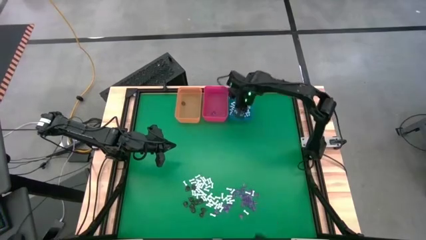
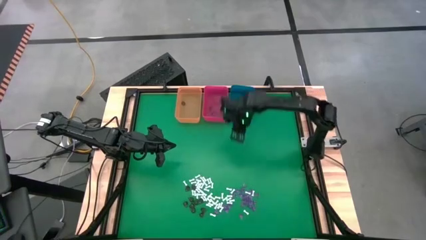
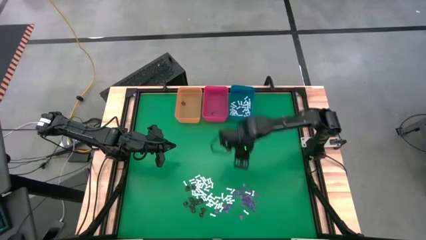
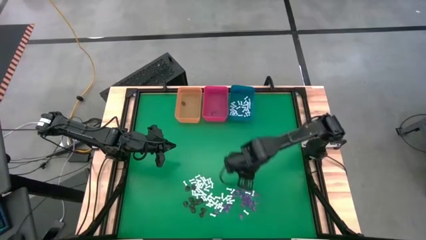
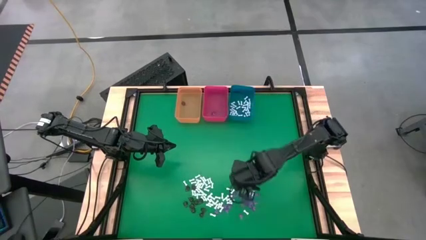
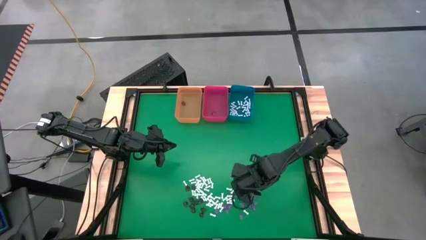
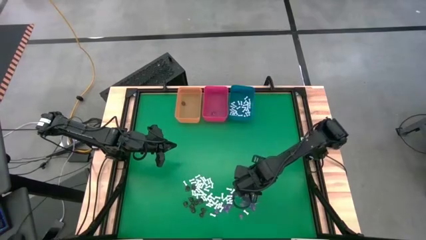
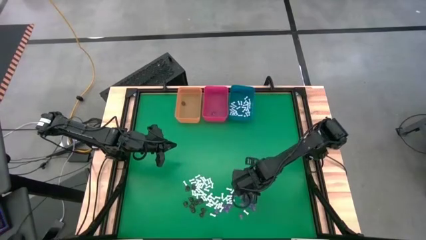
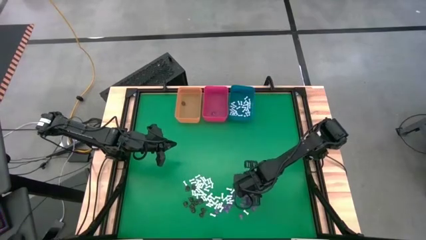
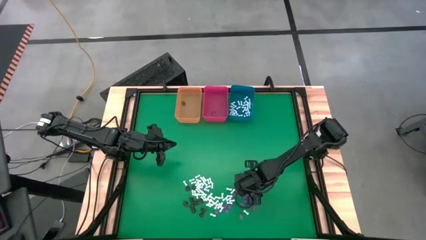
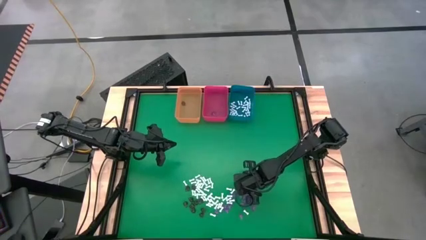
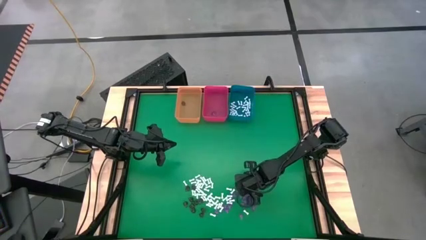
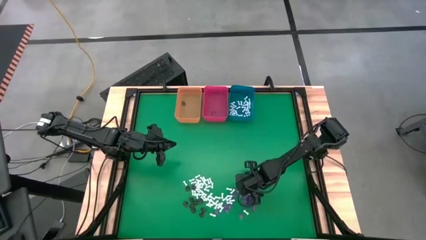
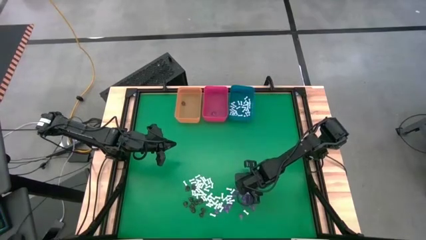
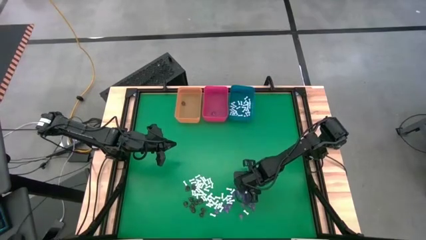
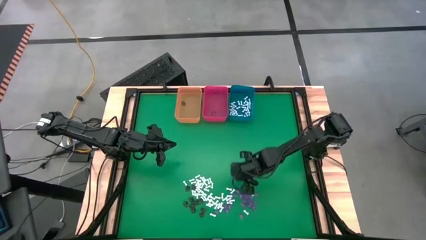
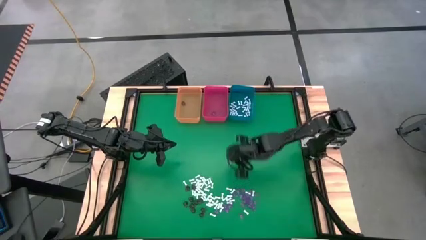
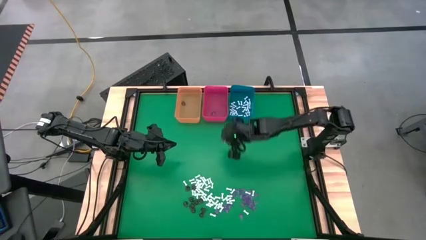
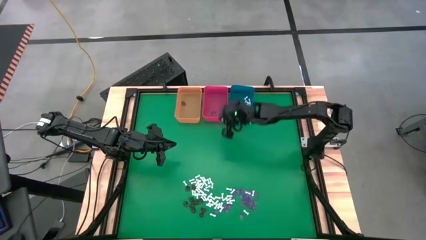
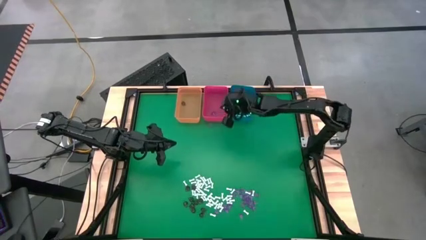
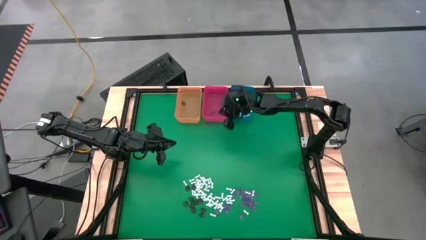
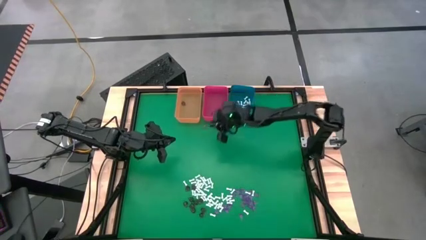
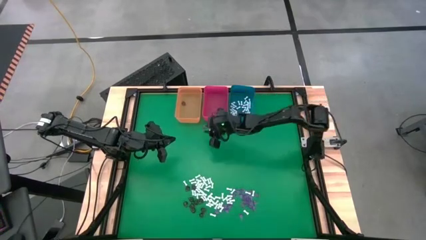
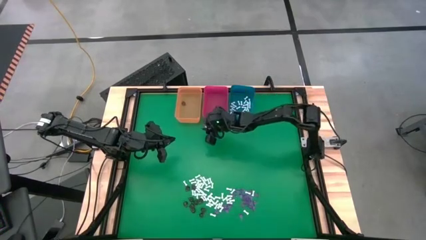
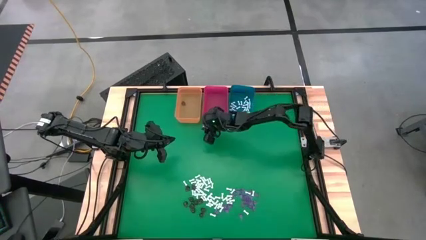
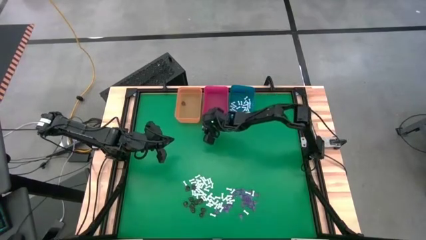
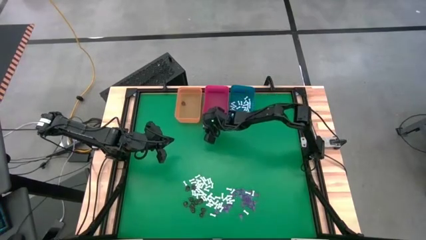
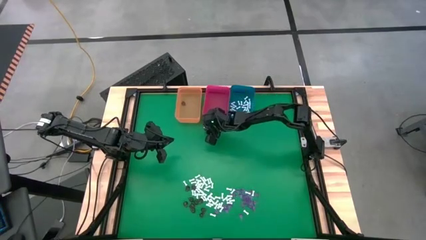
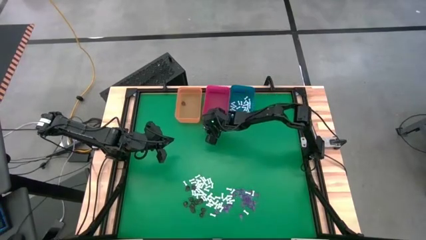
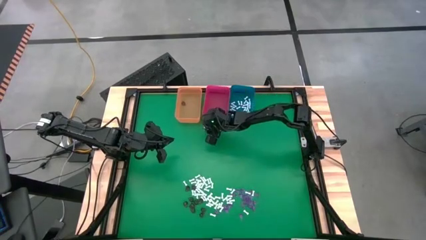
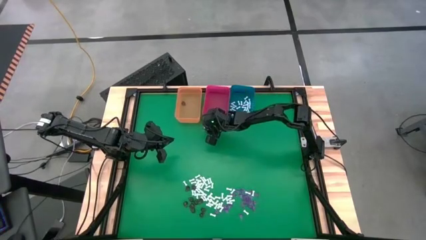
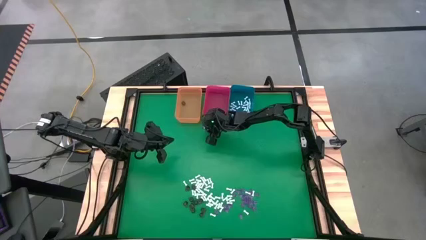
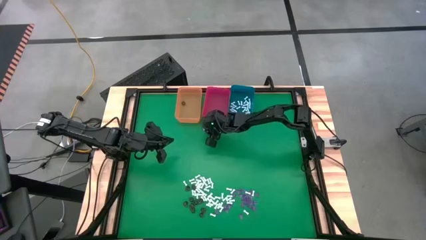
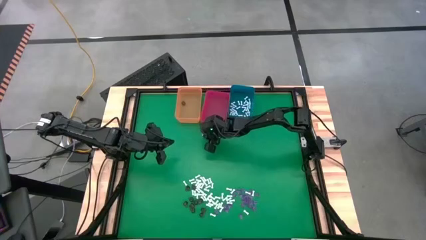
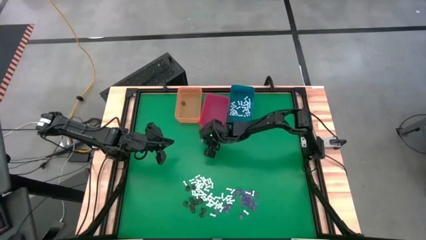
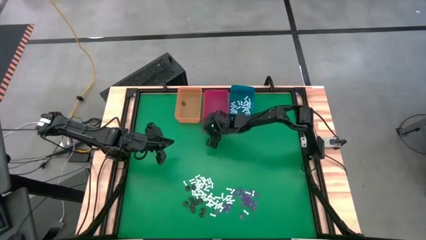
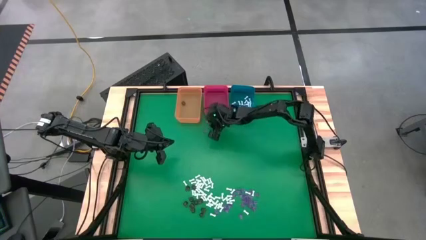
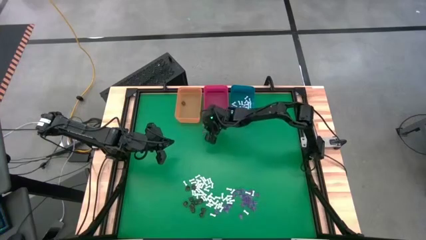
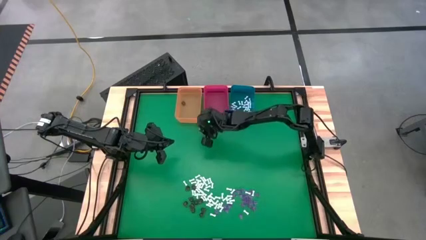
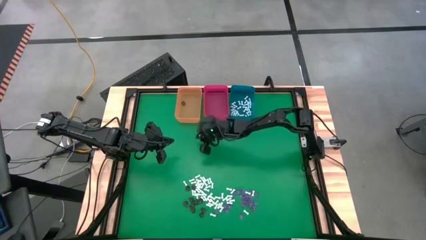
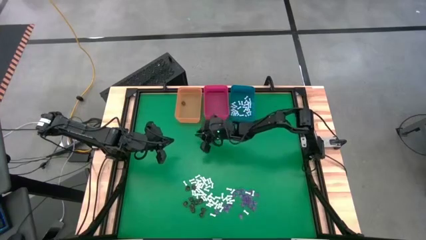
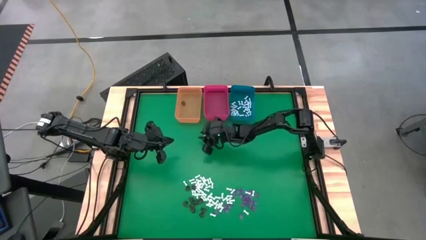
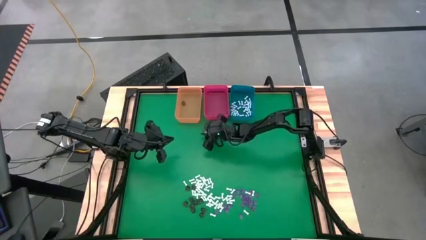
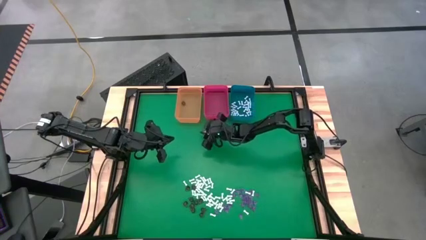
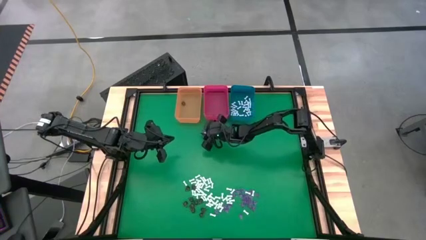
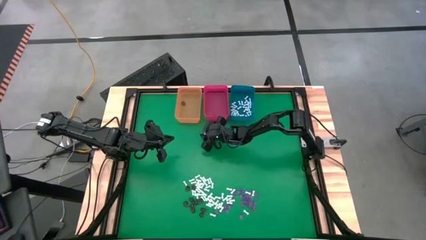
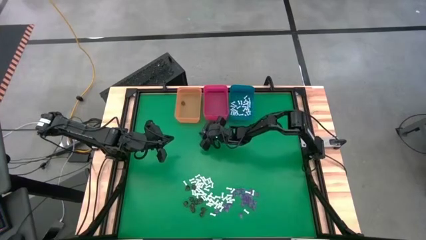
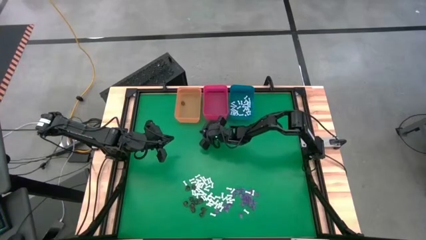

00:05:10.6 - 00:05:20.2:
Task: Sort Halloween decoration
Put the violet witch hat toy into the red bin

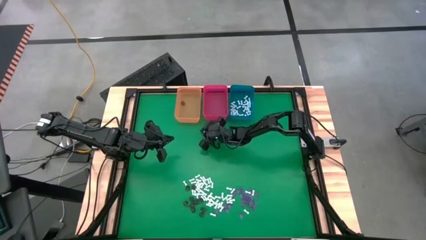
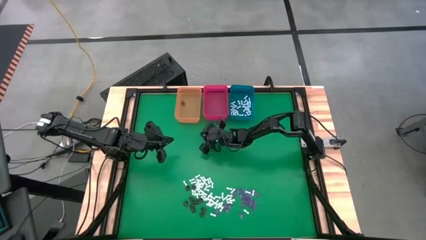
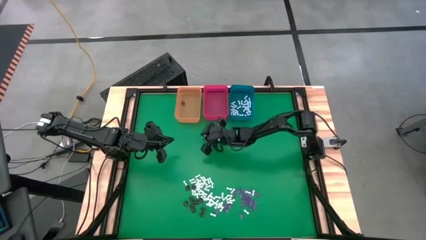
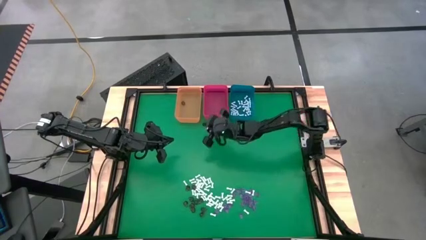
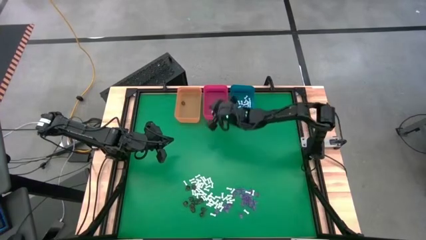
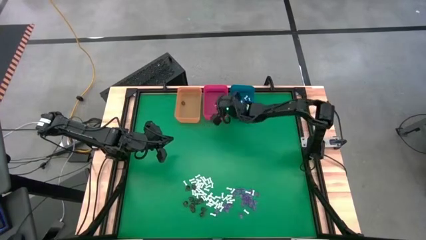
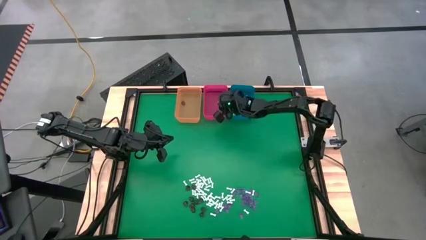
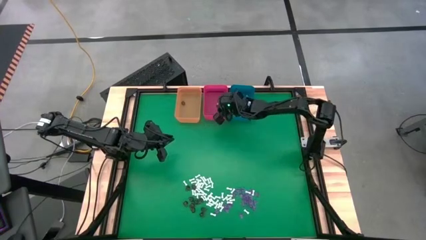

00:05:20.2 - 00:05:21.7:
Put the violet witch hat toy into the red bin

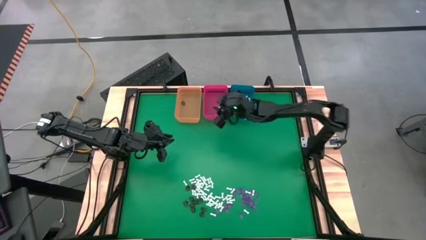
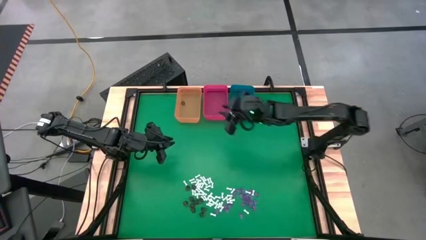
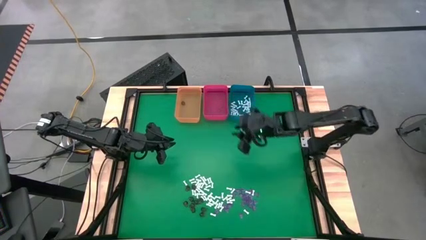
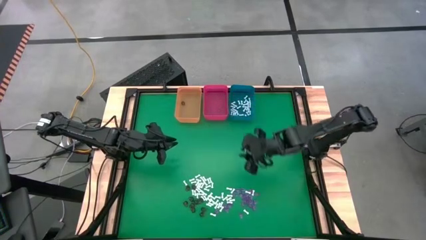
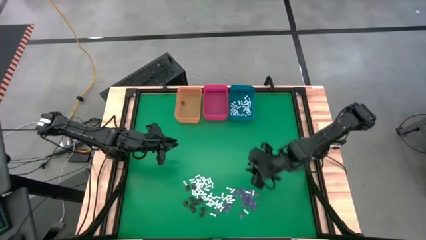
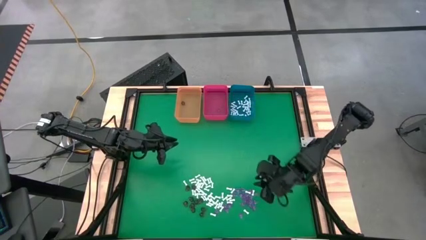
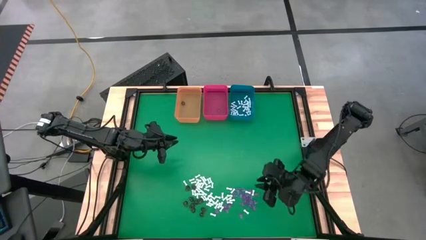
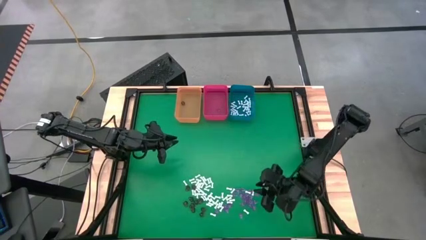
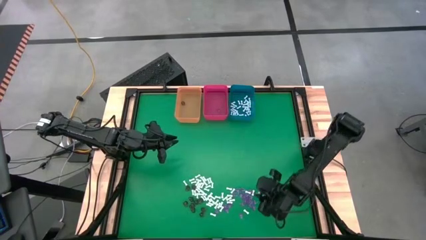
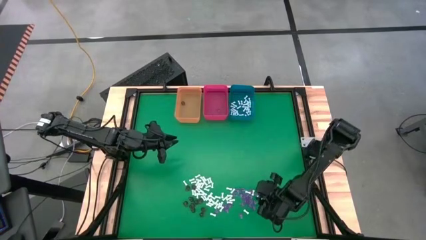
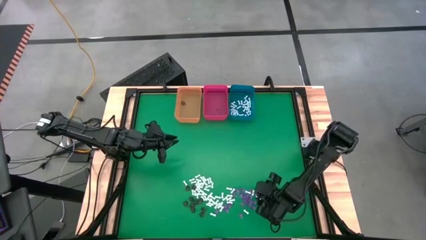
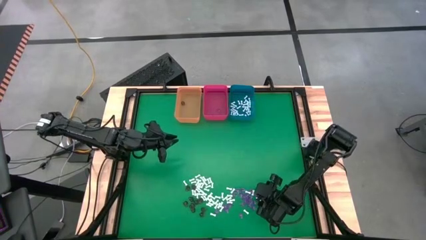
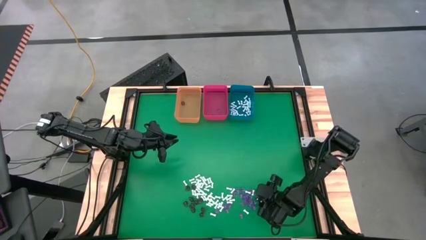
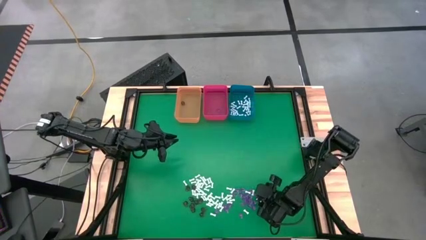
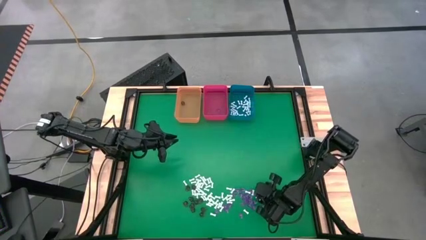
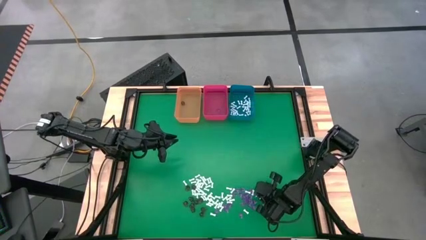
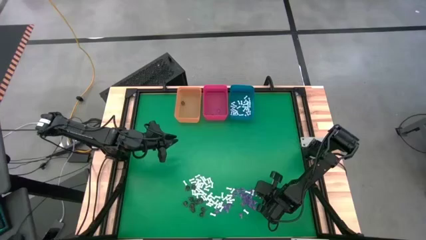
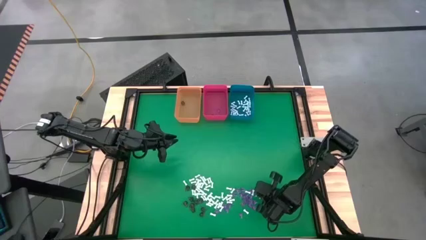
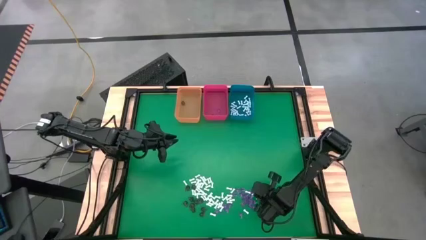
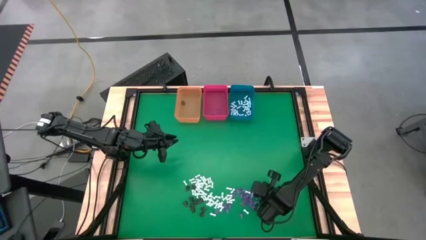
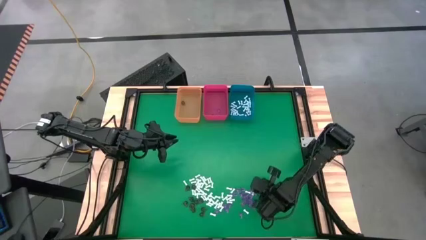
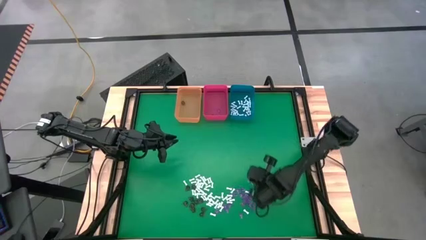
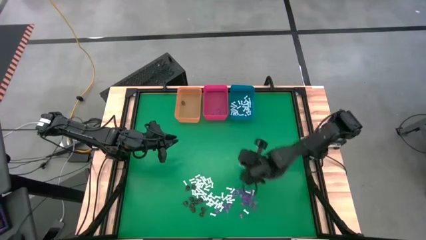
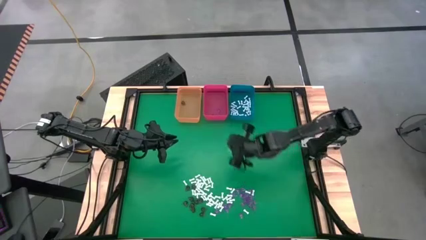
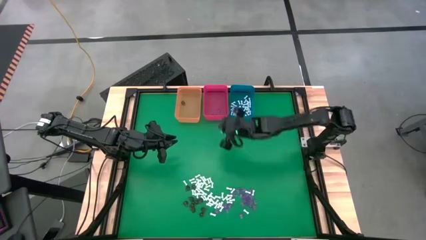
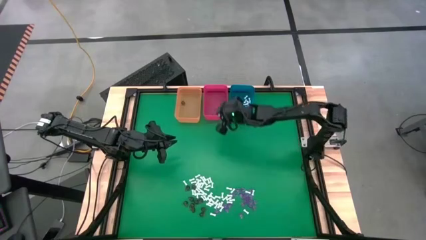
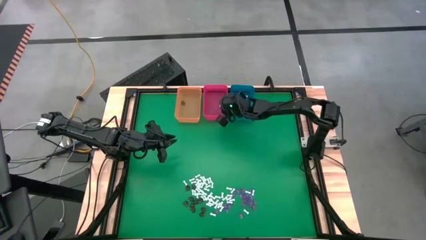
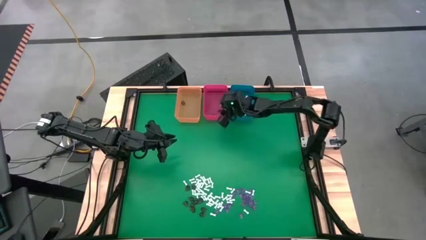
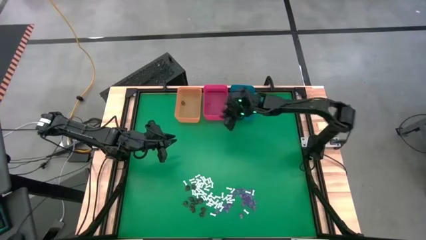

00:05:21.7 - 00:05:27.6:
Put the violet witch hat toy into the red bin
